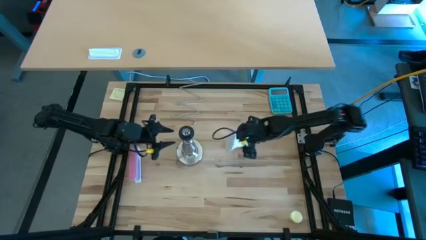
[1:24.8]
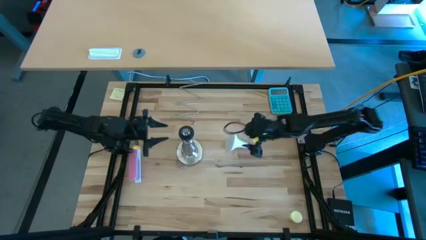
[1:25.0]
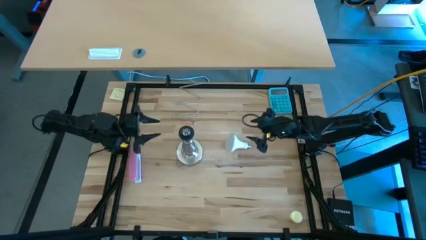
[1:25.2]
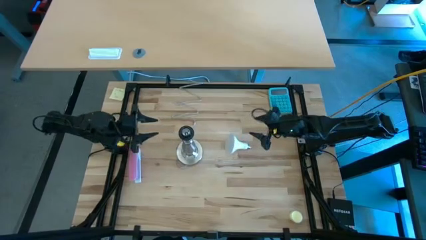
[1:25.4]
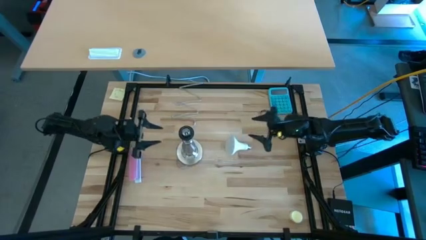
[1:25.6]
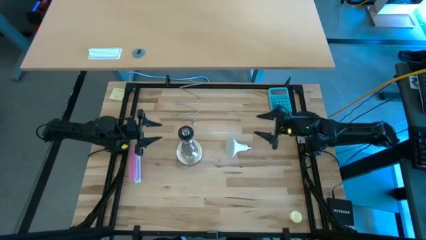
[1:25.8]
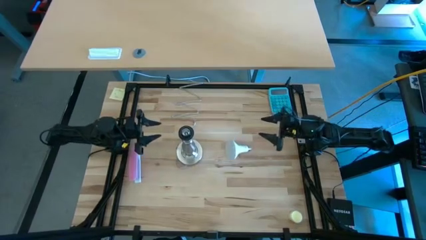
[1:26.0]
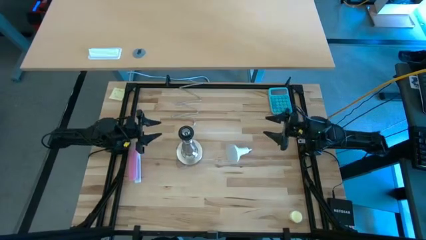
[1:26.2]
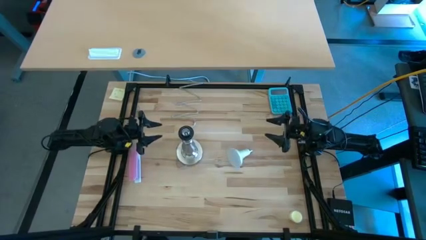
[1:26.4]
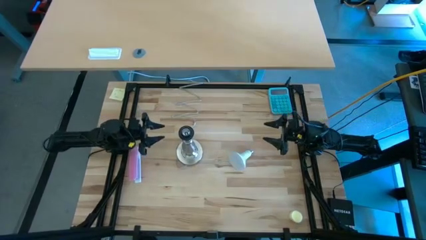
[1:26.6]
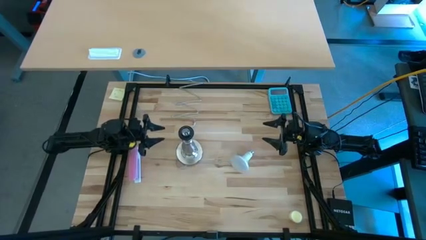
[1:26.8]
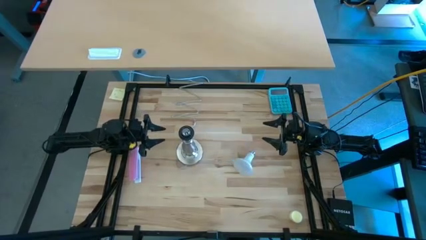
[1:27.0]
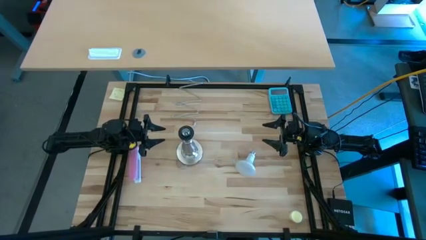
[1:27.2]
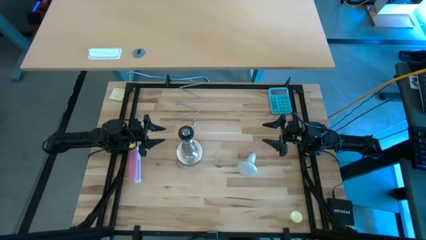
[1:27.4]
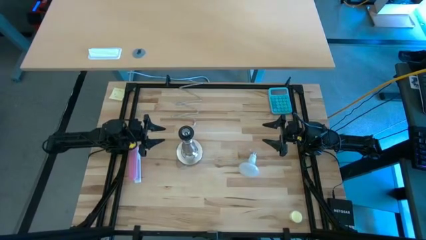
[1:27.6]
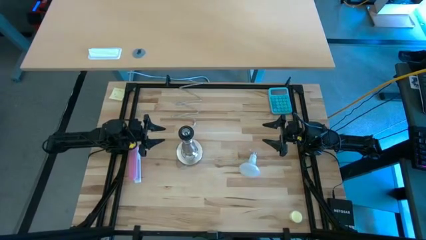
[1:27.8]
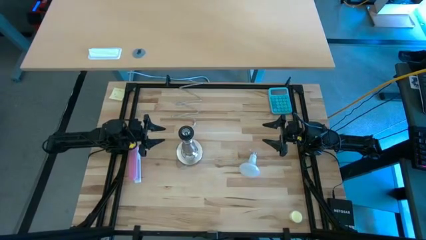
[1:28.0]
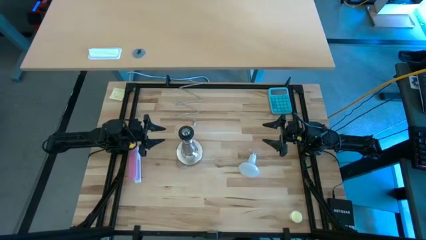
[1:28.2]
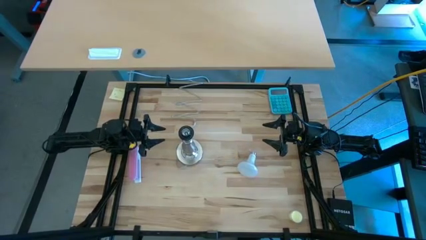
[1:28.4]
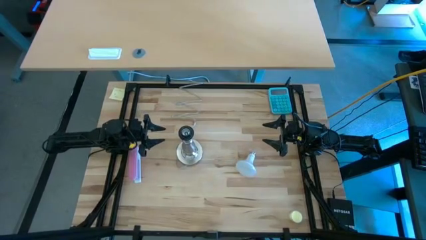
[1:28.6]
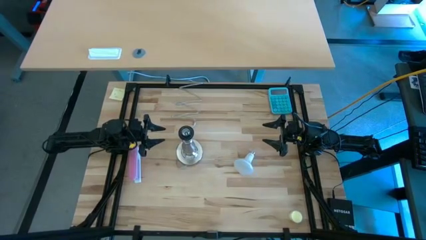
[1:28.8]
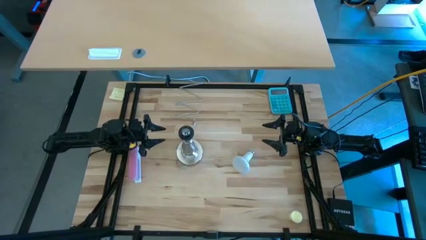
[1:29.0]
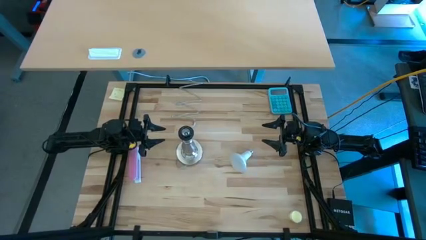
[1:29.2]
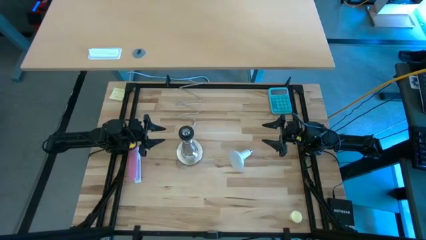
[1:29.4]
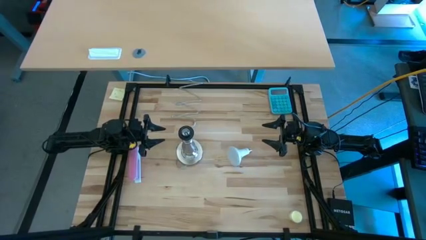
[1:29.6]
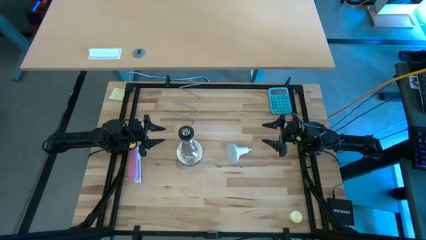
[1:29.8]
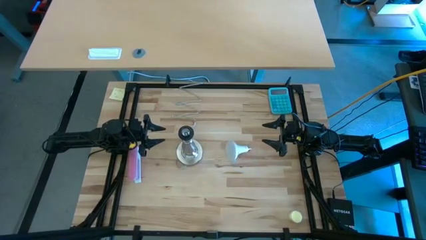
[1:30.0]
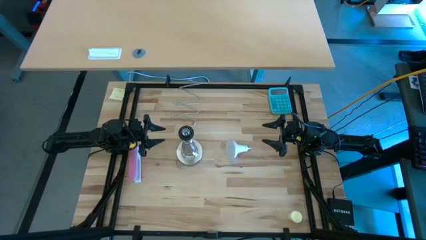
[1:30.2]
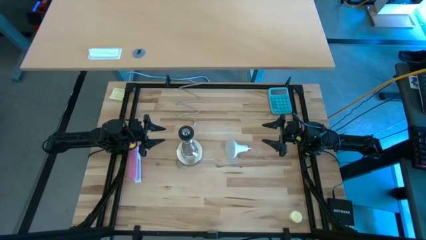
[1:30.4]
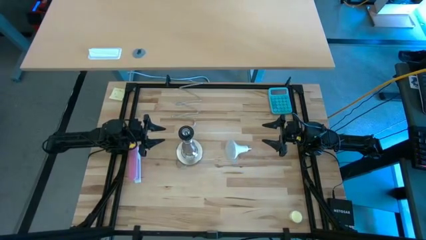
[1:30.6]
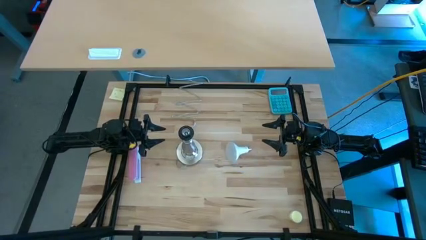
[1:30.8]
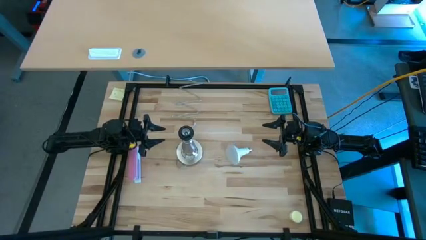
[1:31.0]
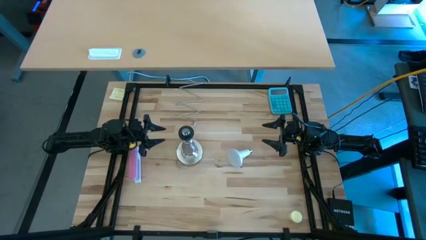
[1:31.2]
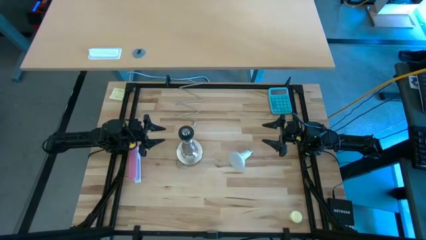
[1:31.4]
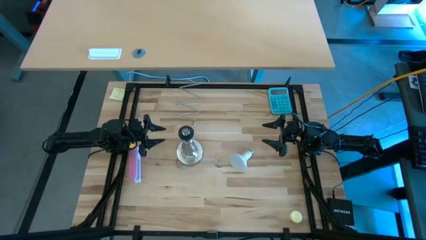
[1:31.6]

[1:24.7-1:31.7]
Task: Screw lightbulb
Return to Home Position

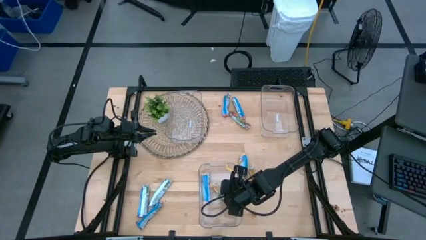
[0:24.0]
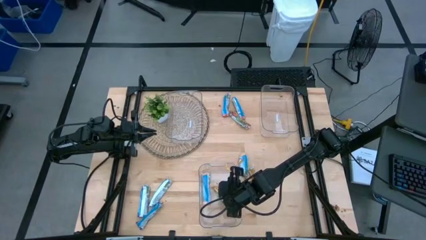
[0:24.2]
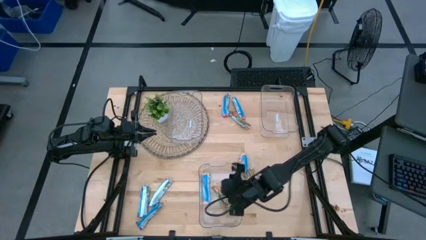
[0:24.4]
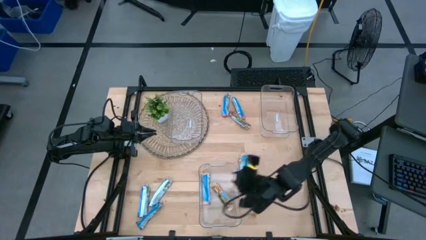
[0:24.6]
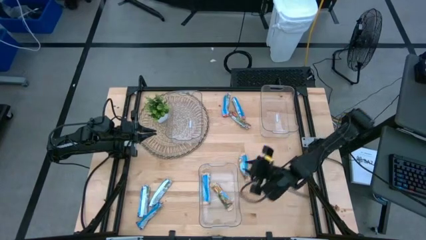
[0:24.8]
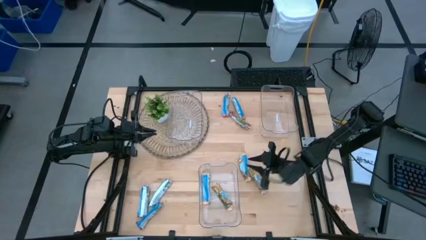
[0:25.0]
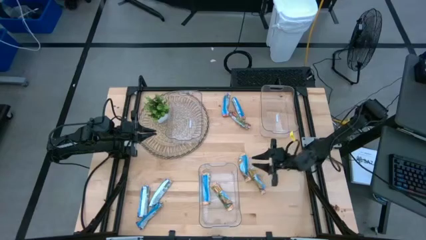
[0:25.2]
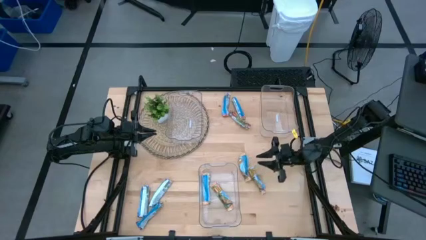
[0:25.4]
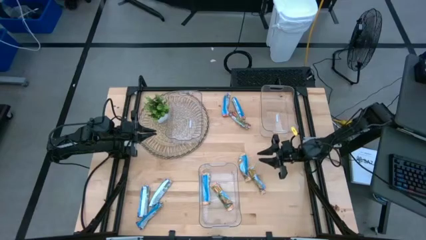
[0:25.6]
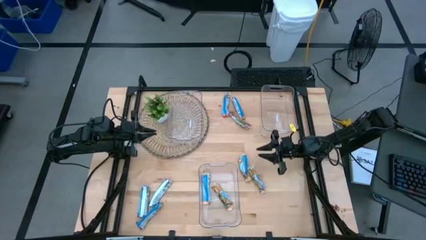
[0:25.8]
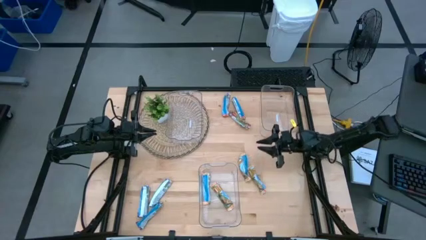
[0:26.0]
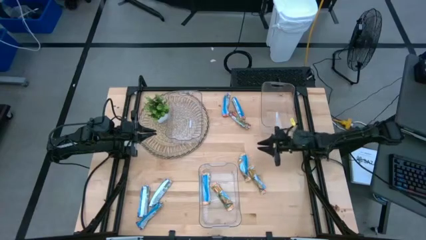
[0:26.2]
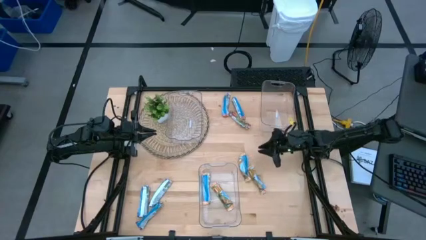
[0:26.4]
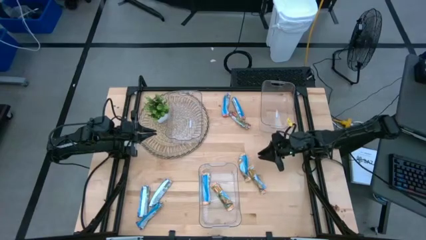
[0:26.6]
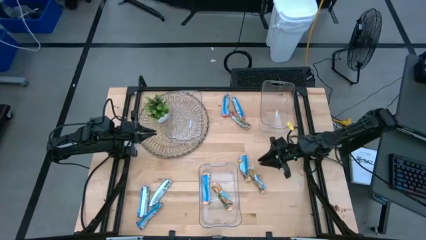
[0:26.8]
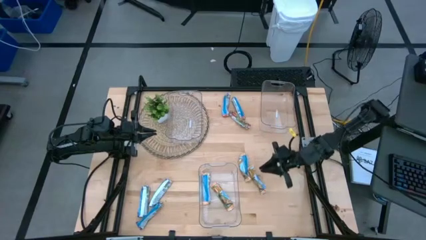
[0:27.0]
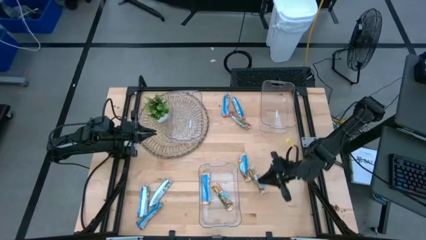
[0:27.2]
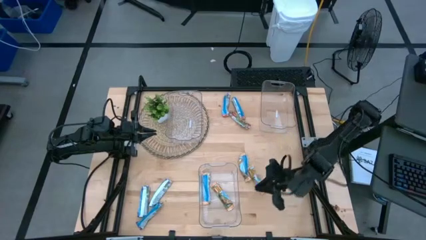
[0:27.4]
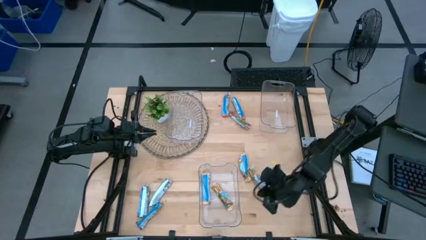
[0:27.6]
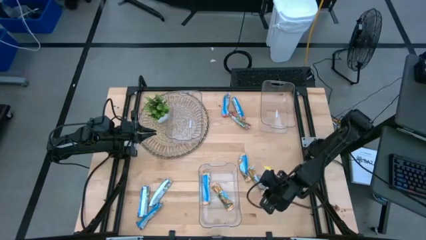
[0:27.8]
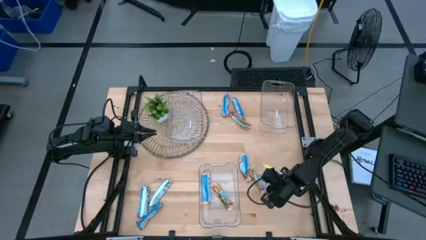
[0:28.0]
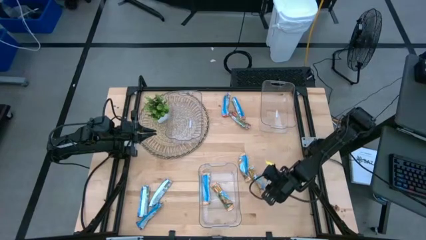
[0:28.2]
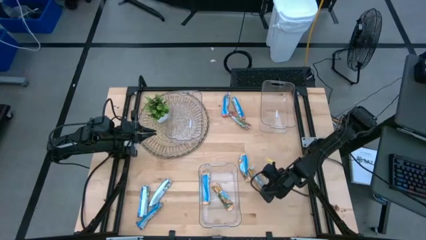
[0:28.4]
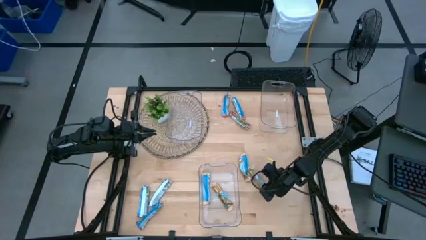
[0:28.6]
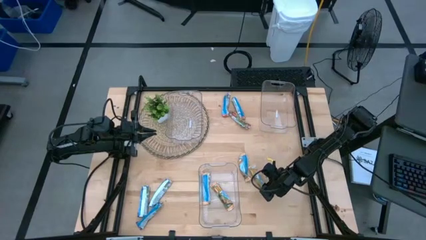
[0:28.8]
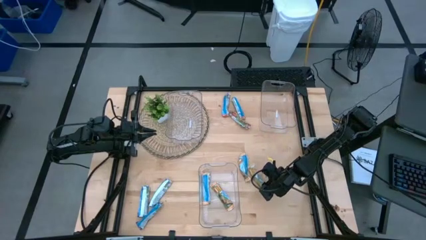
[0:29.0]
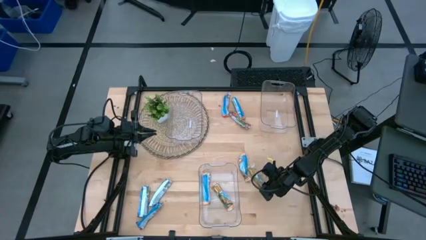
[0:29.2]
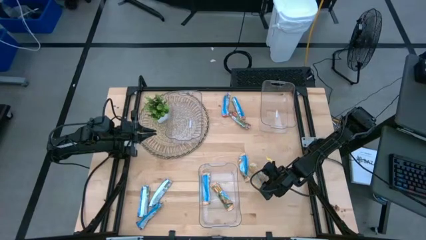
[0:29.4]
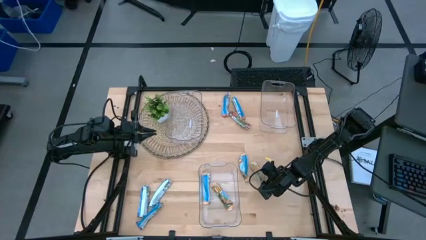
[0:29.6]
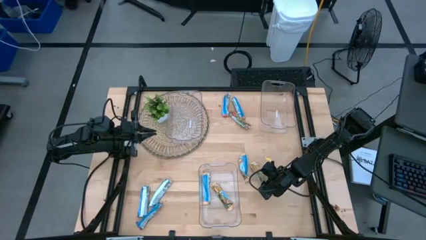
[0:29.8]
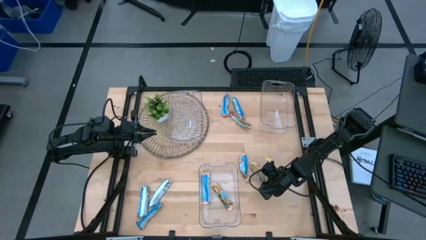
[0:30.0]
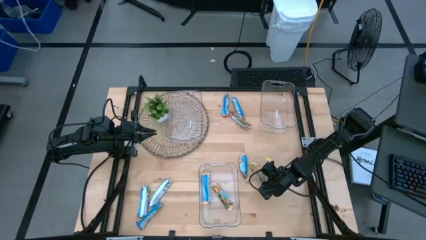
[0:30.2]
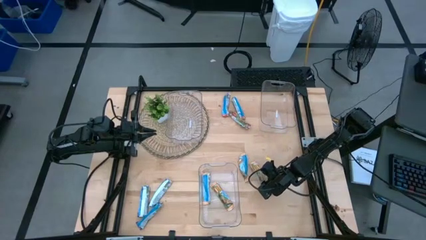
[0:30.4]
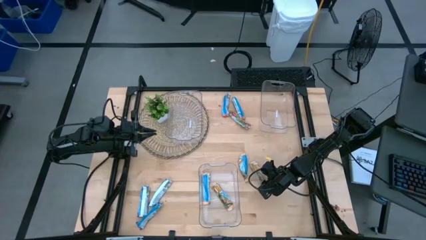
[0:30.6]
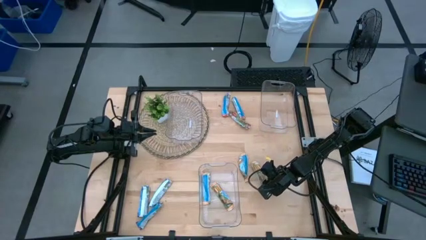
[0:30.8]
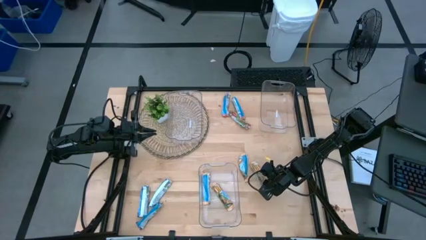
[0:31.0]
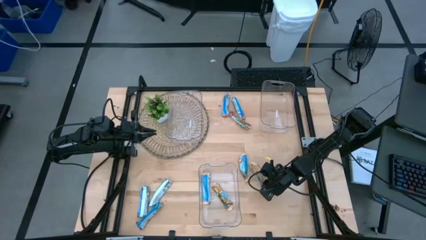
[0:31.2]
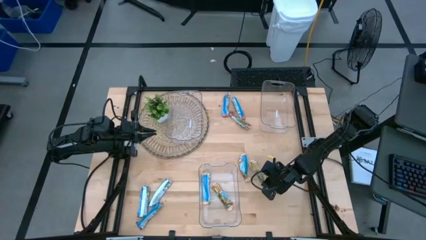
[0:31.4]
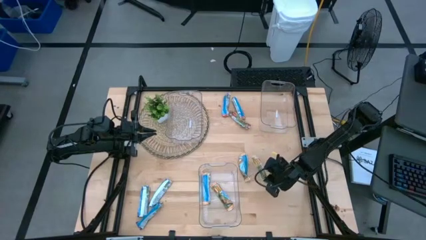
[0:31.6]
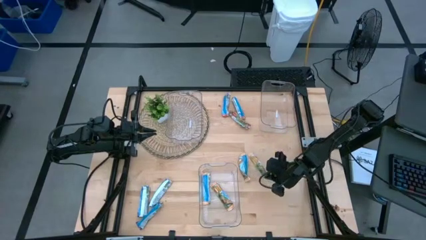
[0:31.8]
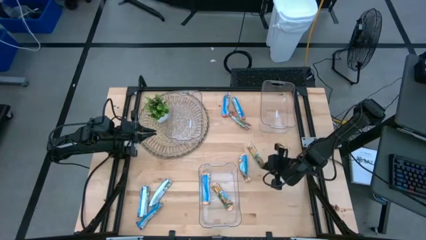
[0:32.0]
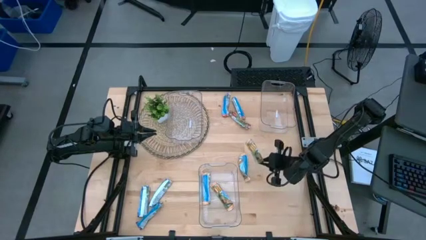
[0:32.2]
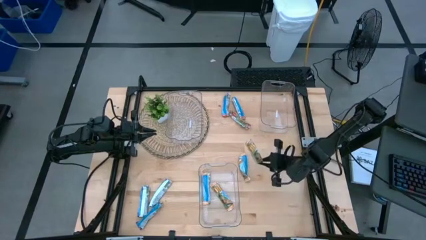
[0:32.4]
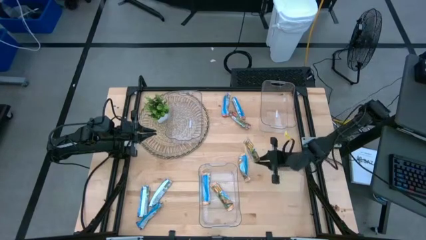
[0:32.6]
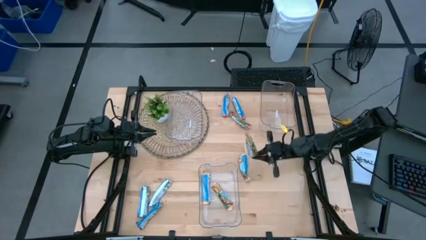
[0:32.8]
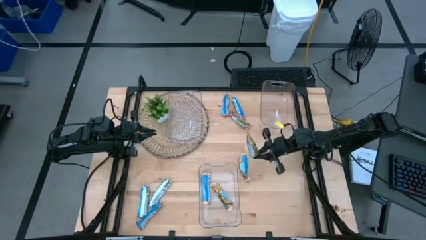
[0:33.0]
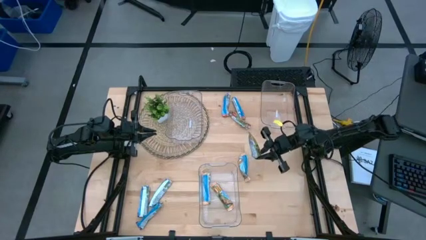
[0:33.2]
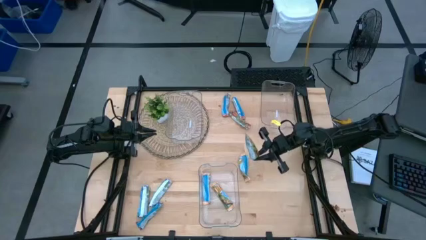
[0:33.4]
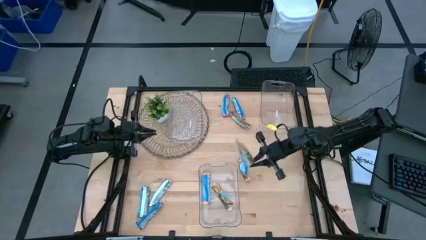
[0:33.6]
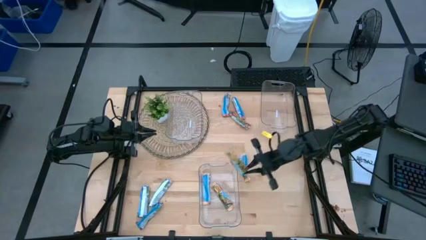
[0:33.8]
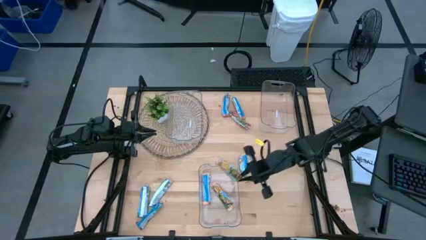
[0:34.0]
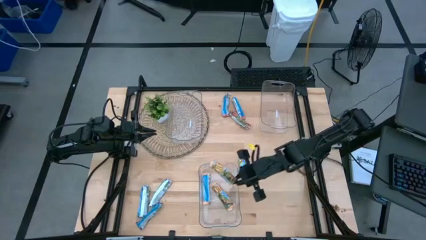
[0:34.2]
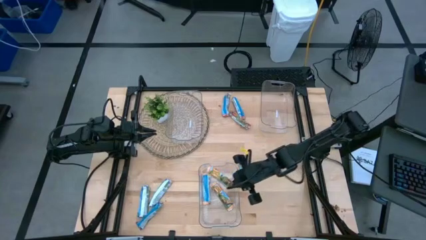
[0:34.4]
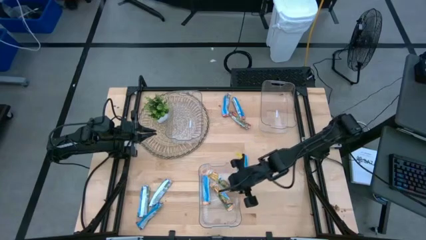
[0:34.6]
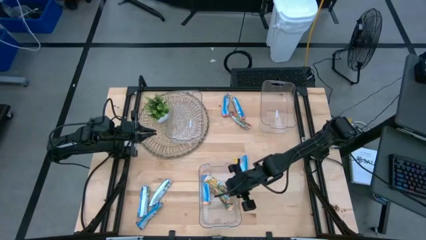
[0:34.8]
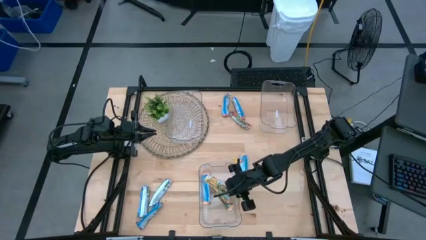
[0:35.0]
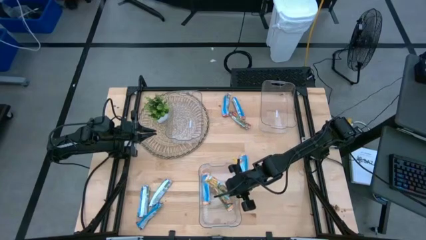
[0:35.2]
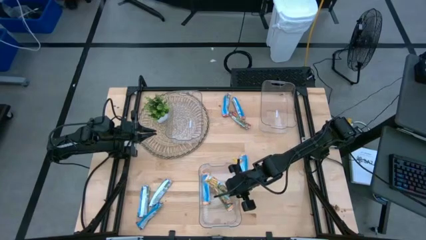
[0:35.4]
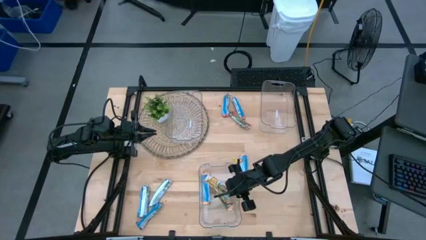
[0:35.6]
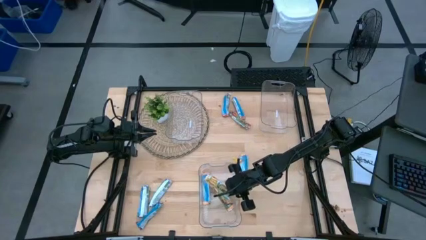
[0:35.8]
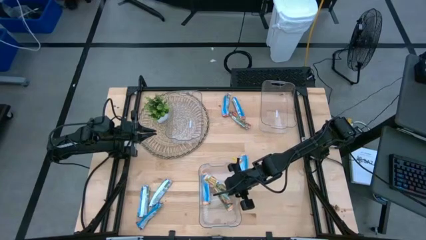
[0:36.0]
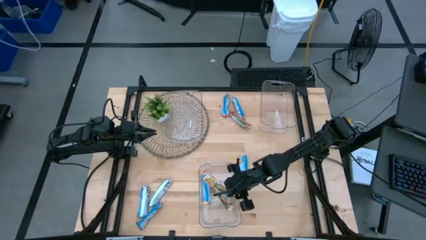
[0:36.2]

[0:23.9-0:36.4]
Task: Pick and place Granola Bars by type
Put the yellow granola bar into the bottom transparent bin
